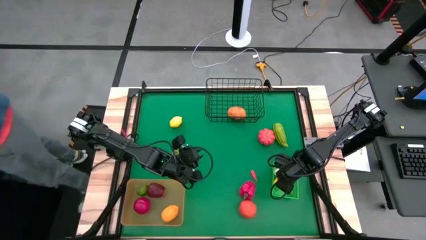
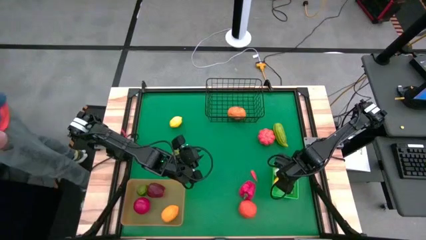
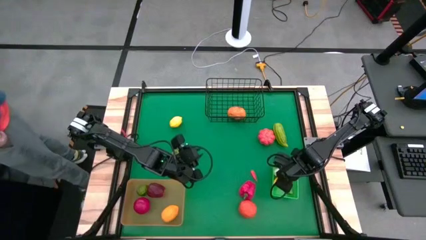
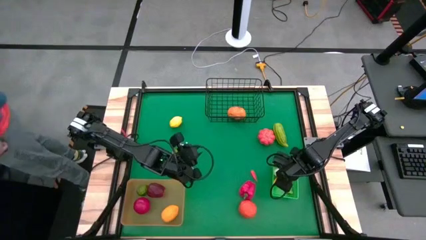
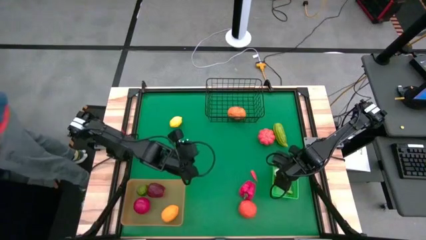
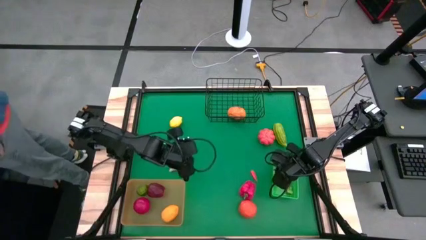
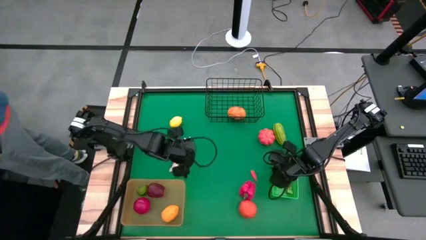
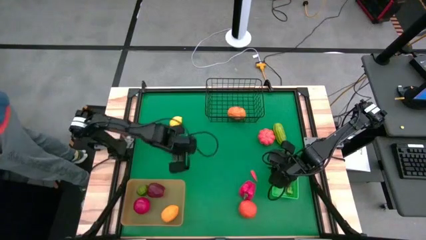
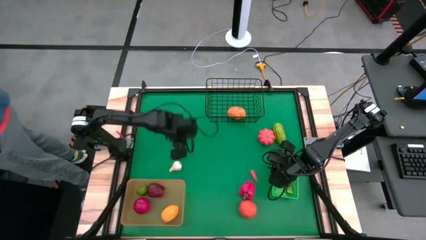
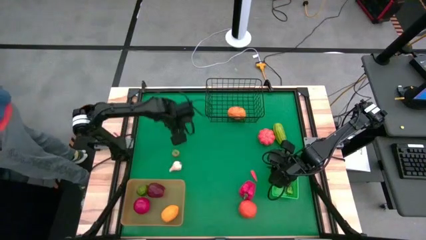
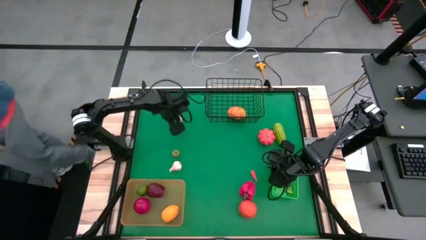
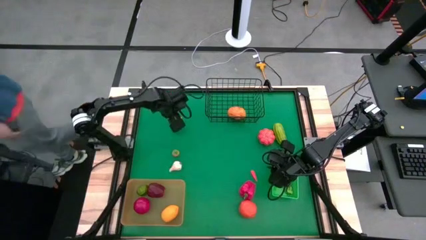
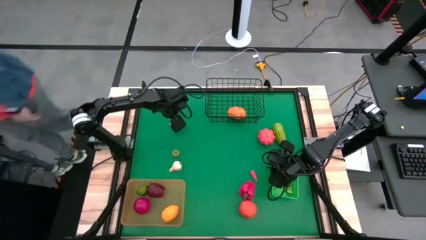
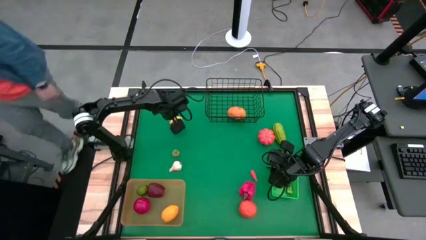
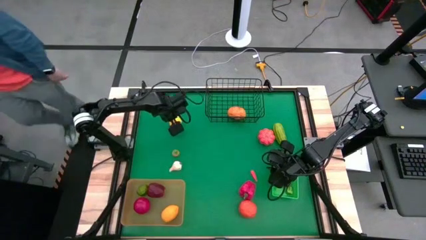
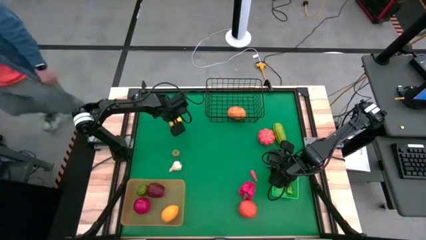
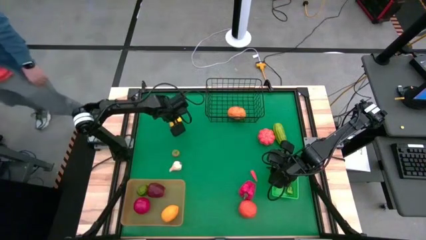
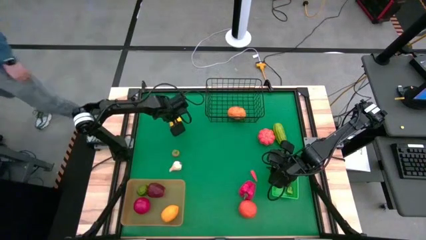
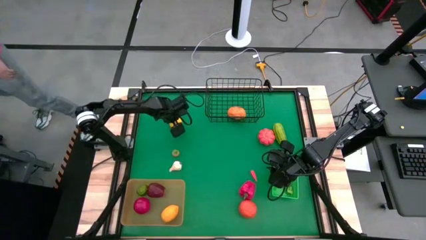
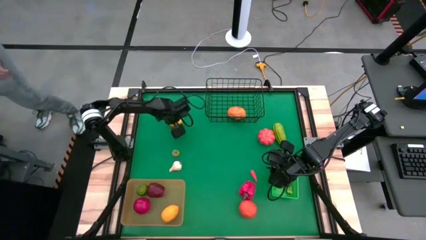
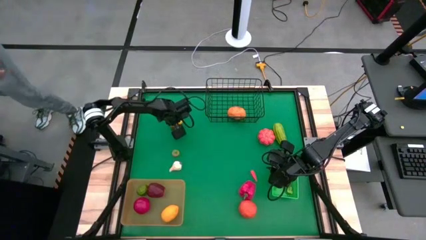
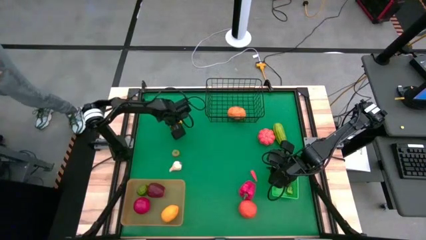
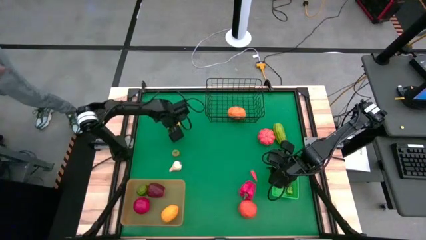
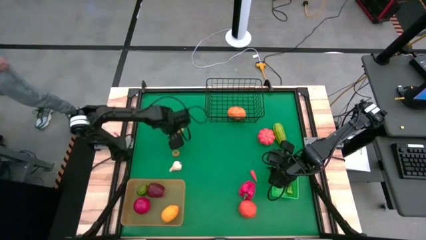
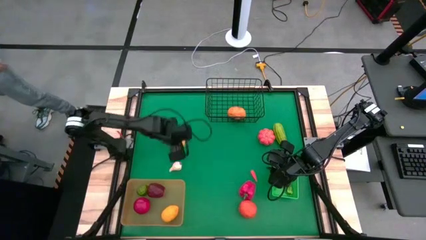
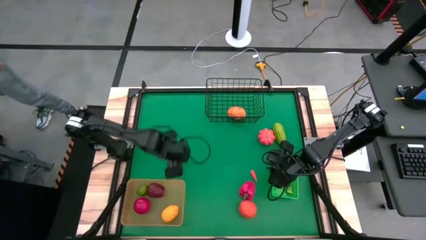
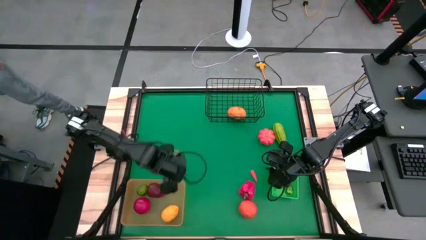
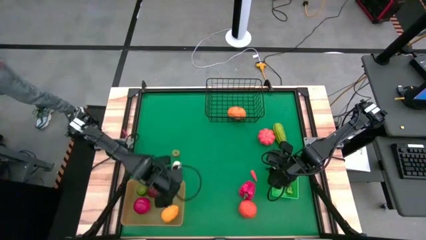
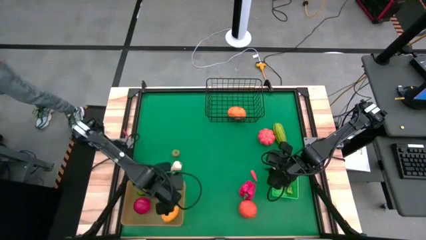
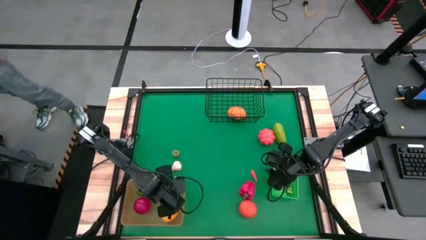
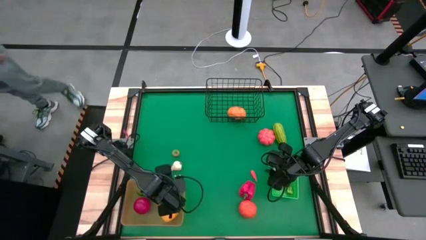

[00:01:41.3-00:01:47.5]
Task: Sort produce into baskets
Put the lemon into the orange bin

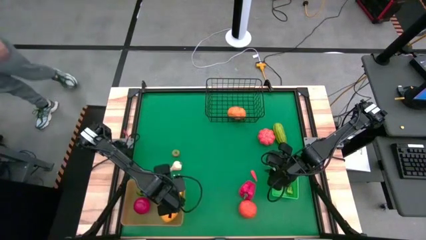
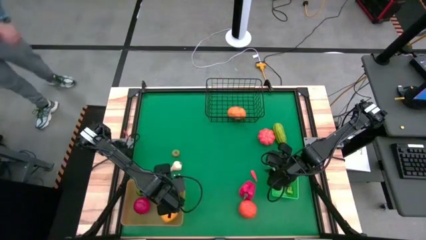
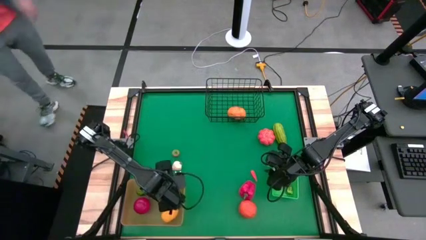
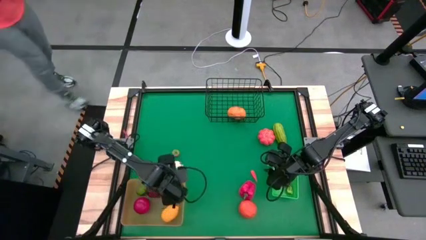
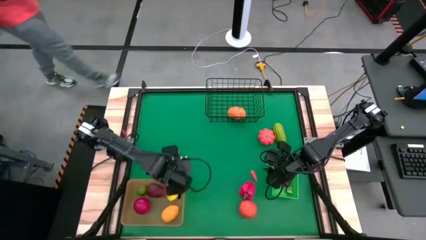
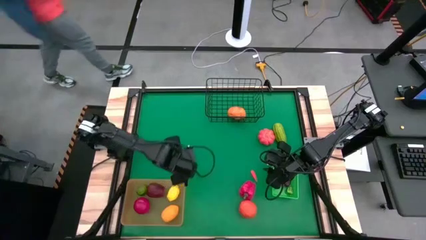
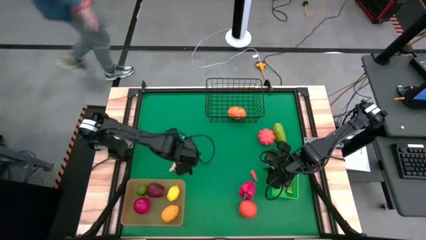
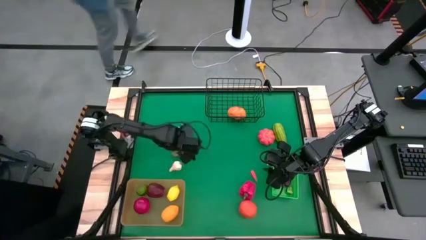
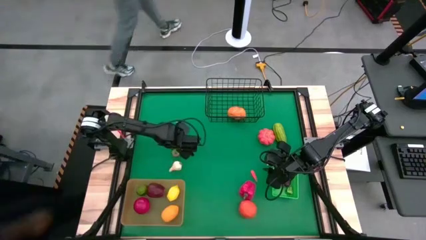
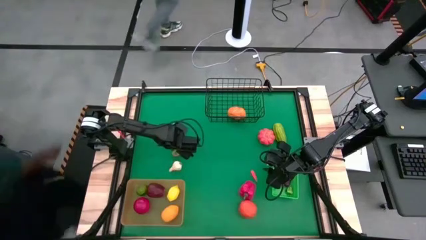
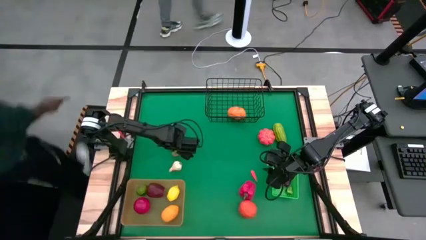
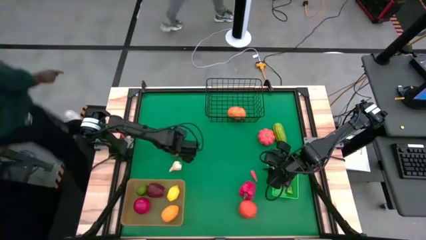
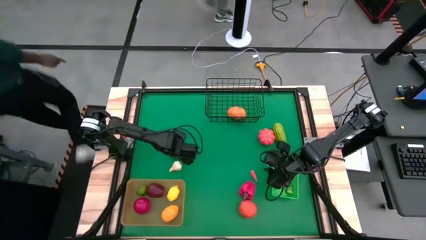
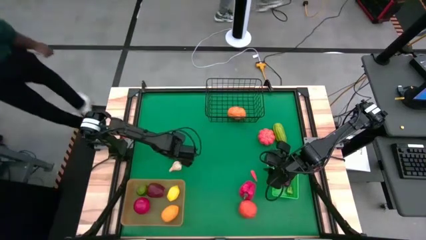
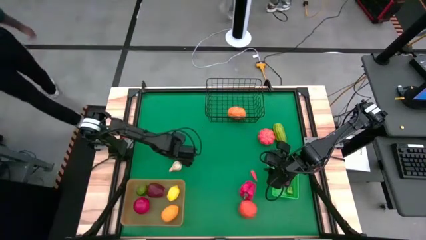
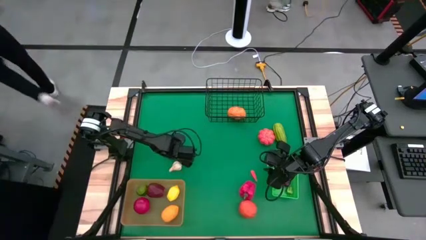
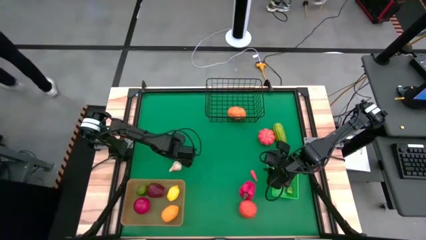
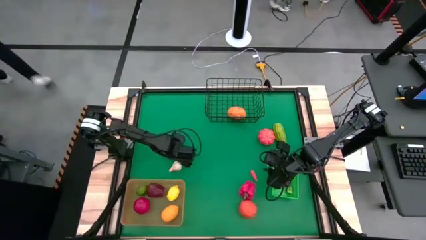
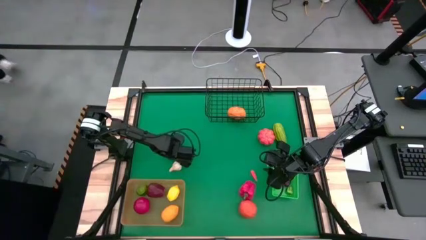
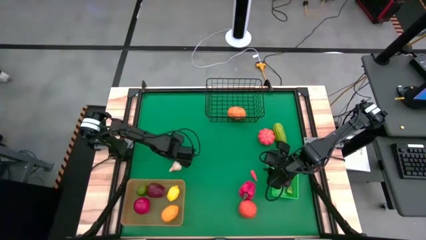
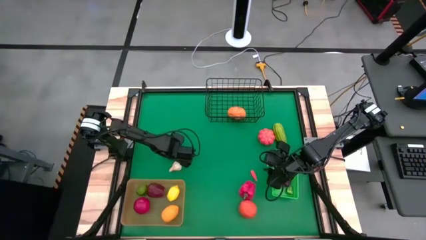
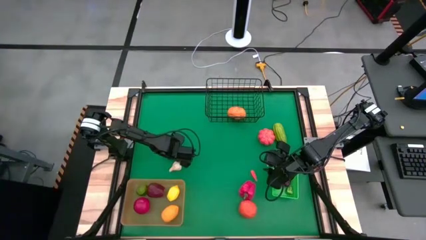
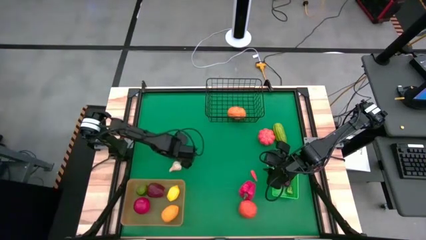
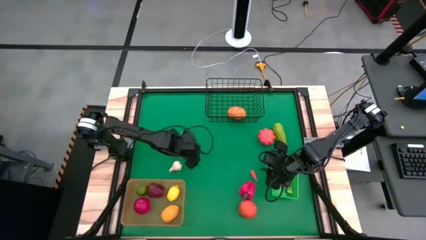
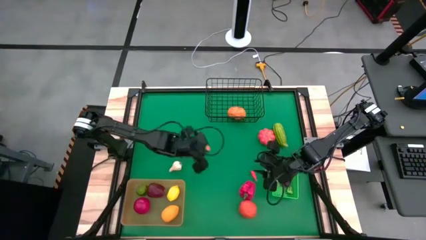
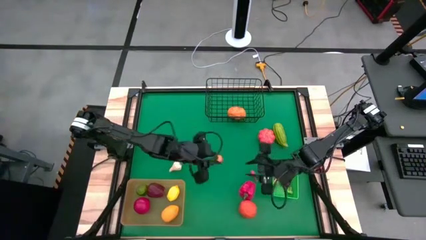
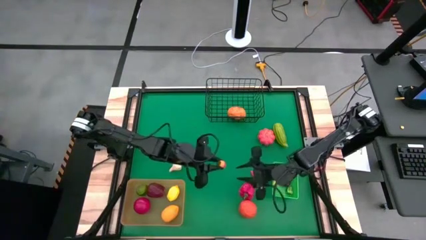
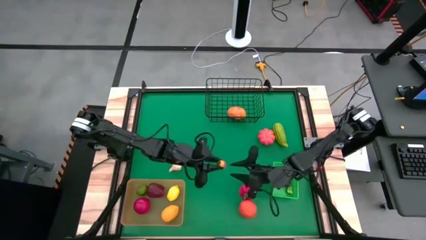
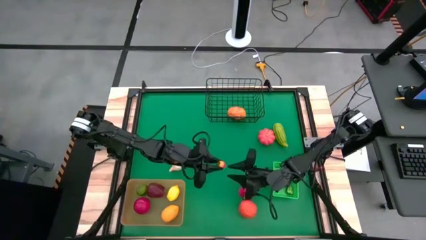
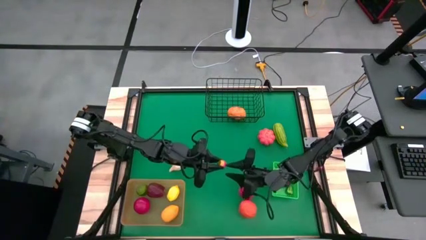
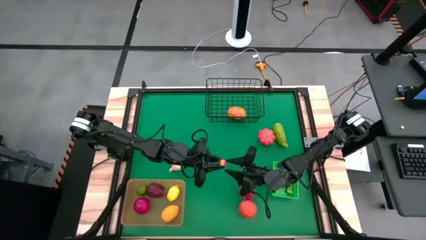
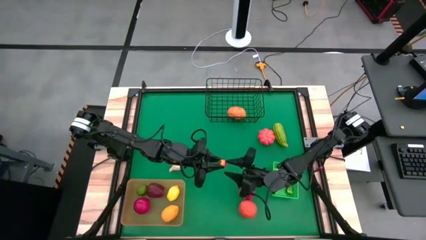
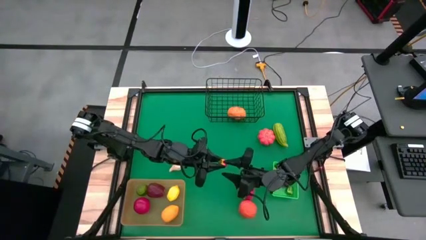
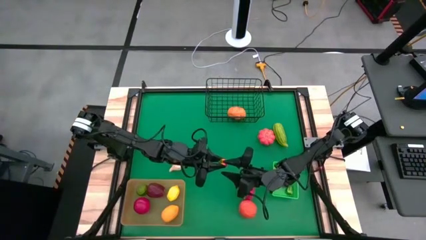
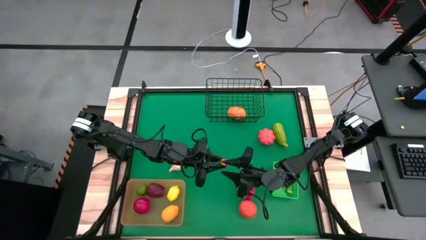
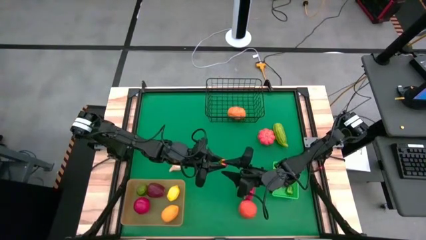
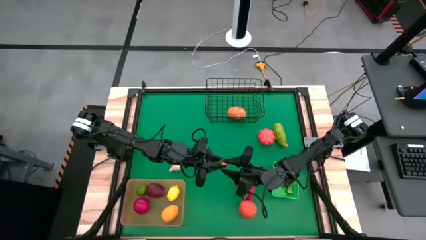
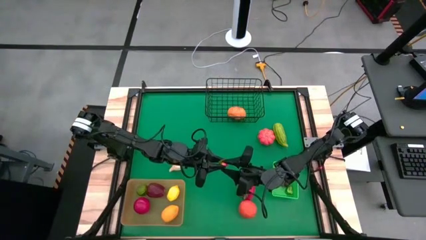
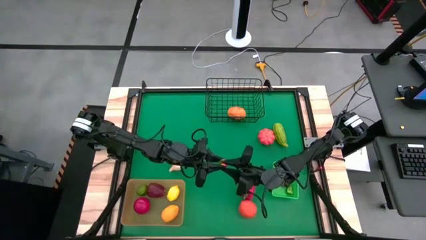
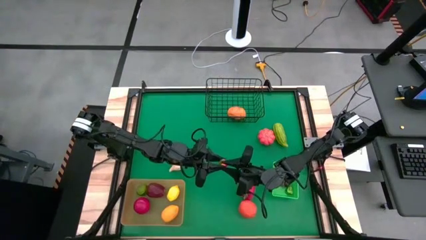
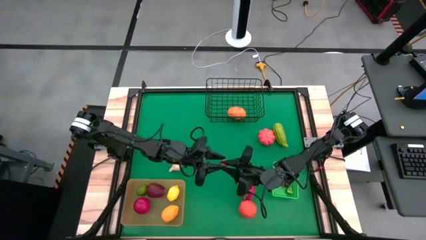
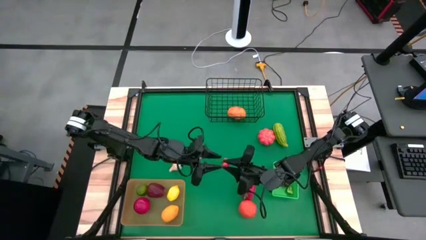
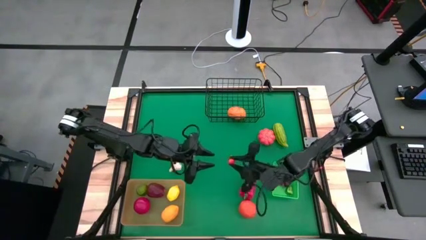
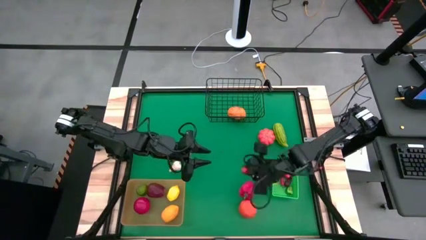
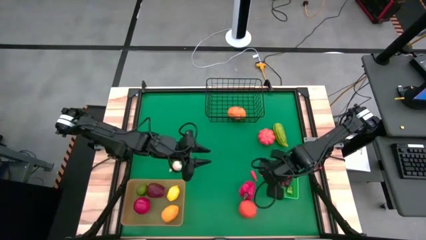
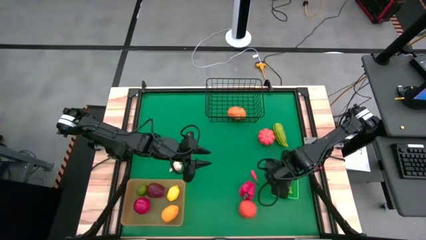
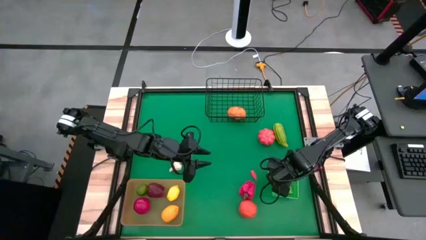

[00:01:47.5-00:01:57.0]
Put the strawberry into the green bin

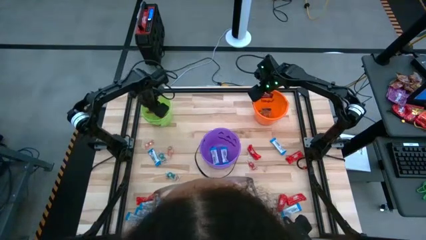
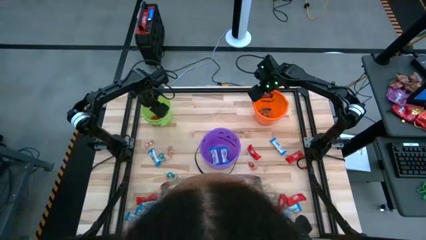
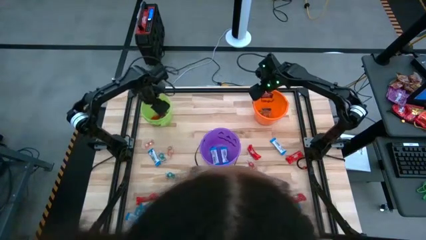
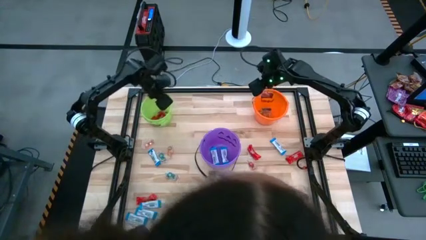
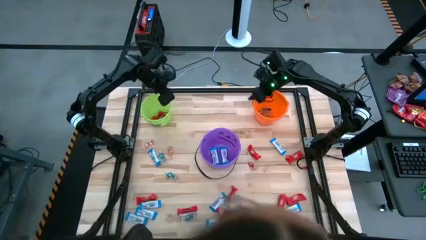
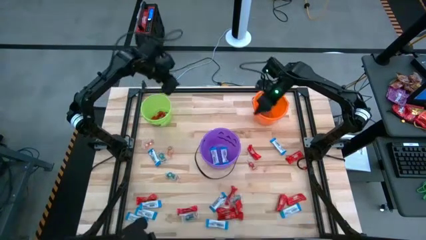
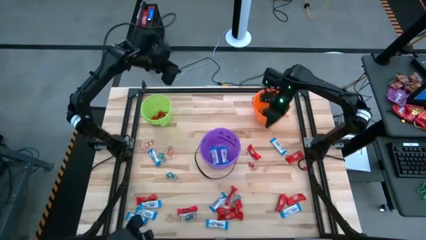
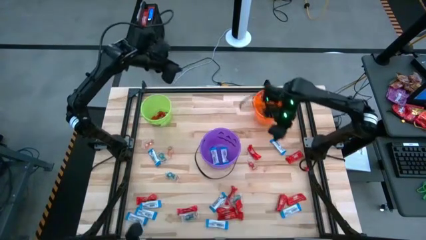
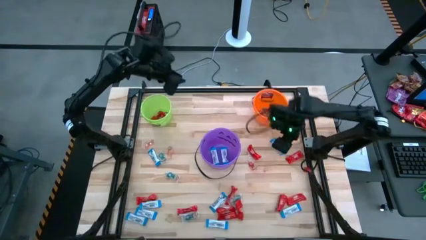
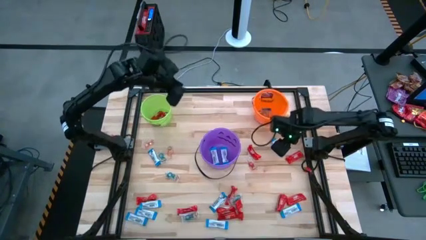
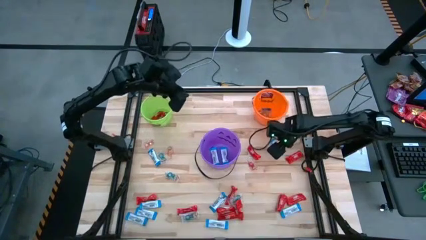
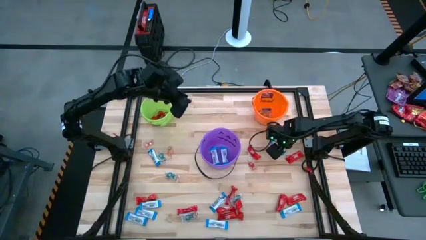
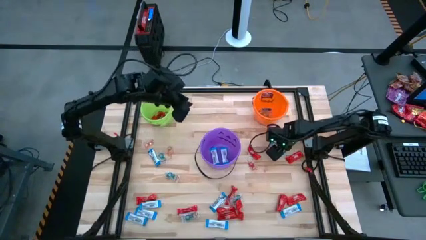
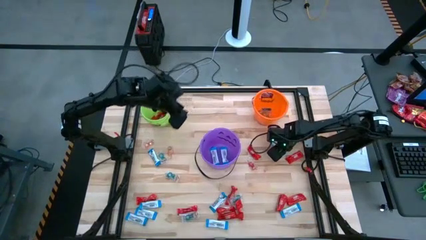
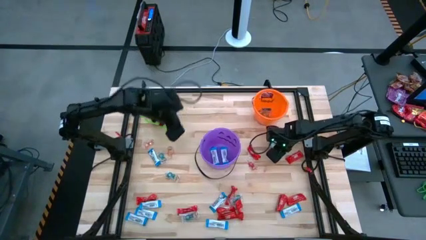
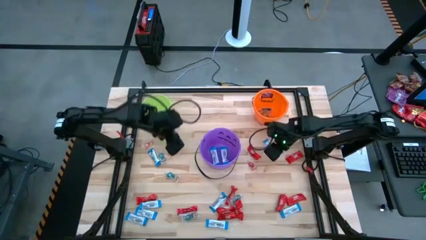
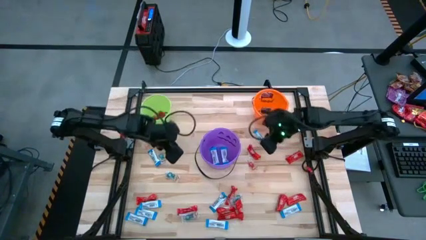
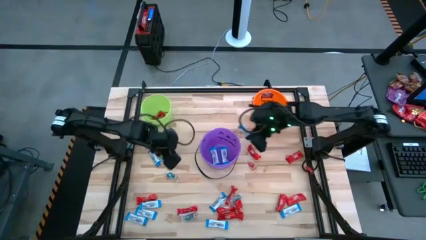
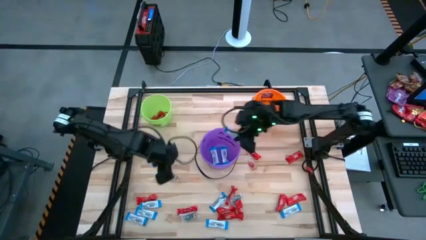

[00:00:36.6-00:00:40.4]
Task: Sort candy by brand, put in halloween buckets
Put the white chocolate into the purple bucket
